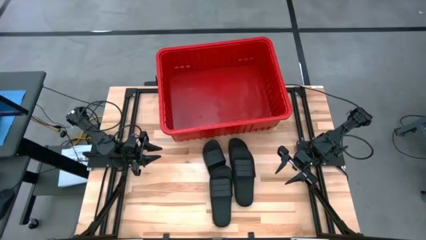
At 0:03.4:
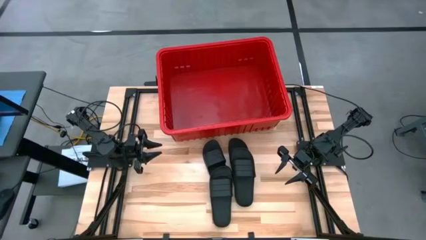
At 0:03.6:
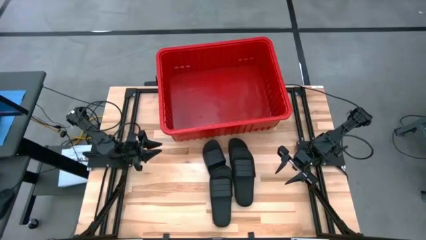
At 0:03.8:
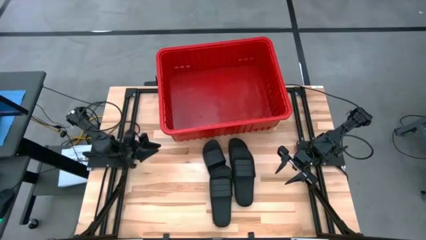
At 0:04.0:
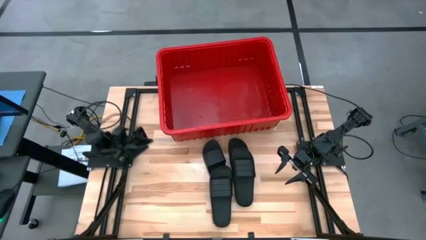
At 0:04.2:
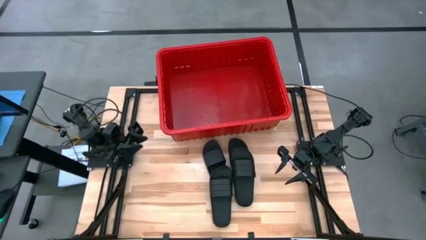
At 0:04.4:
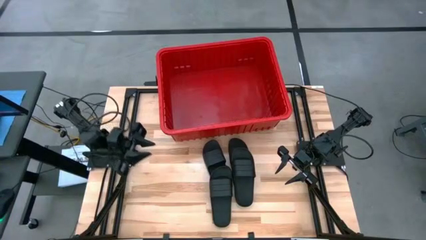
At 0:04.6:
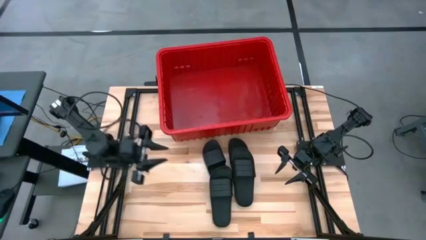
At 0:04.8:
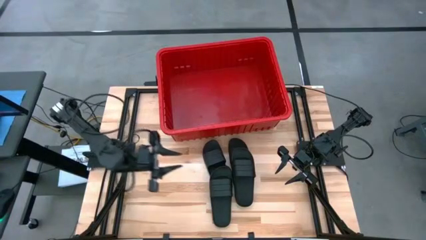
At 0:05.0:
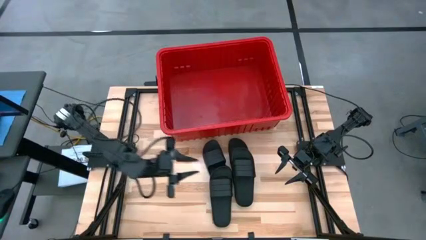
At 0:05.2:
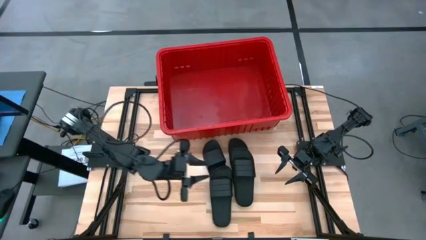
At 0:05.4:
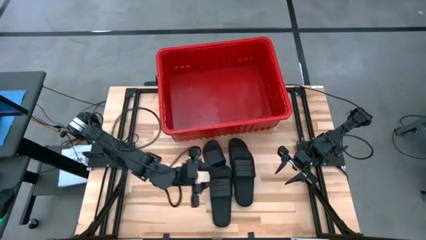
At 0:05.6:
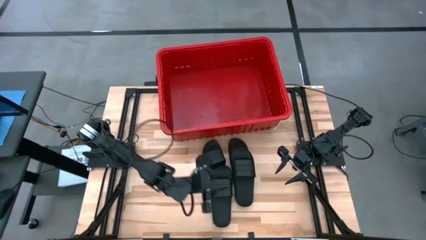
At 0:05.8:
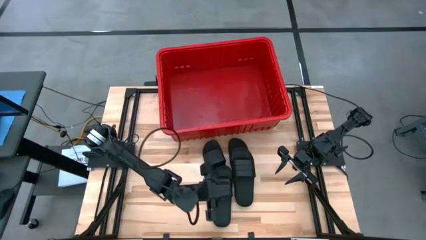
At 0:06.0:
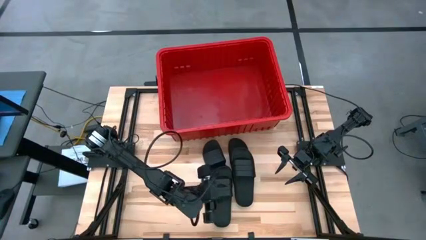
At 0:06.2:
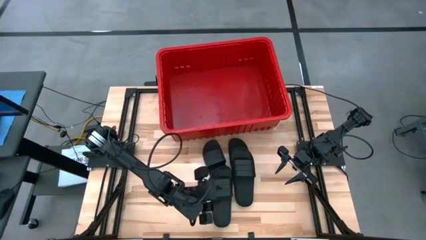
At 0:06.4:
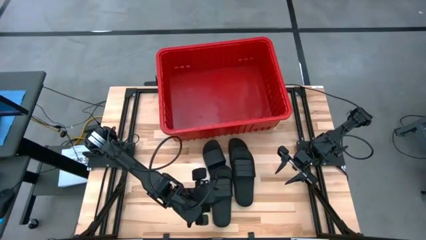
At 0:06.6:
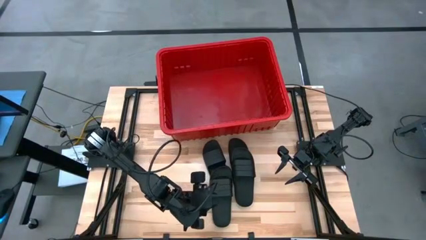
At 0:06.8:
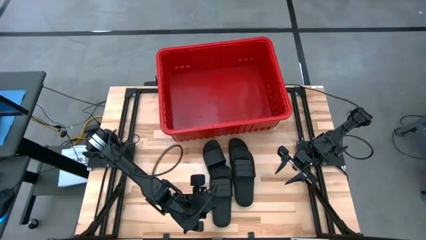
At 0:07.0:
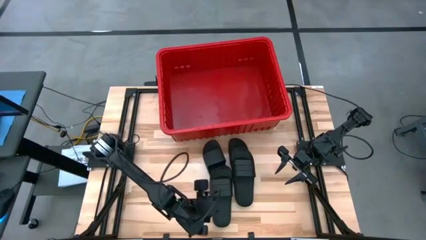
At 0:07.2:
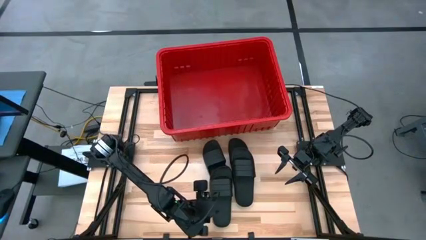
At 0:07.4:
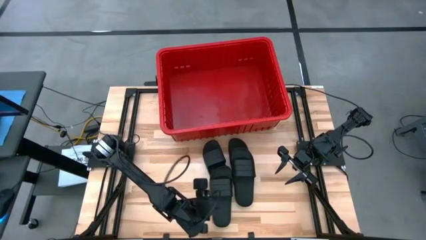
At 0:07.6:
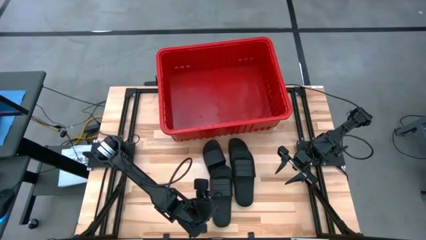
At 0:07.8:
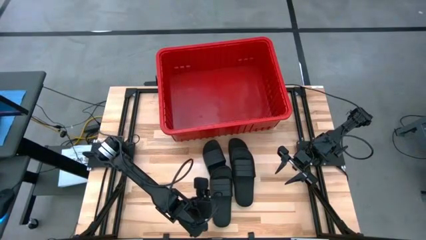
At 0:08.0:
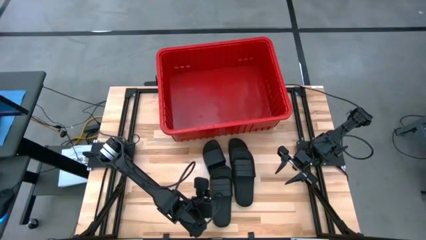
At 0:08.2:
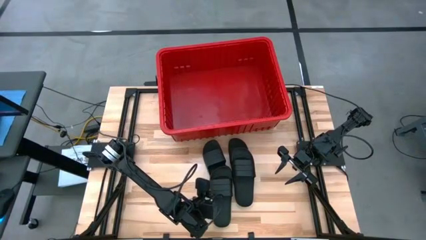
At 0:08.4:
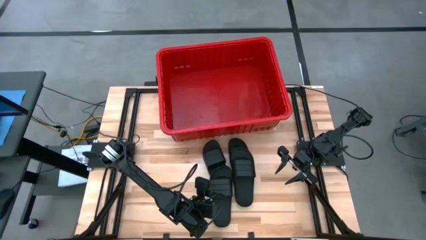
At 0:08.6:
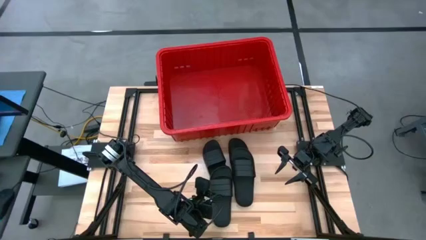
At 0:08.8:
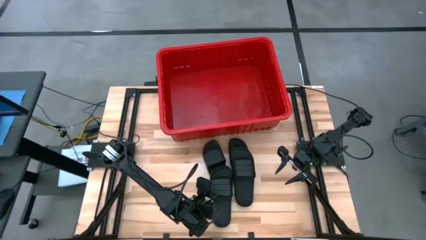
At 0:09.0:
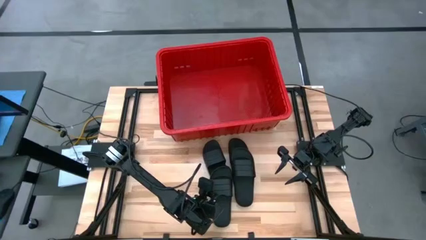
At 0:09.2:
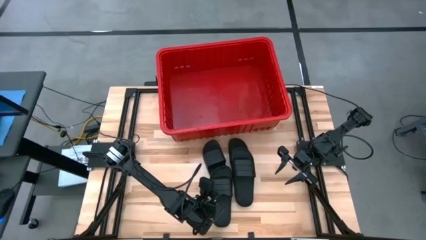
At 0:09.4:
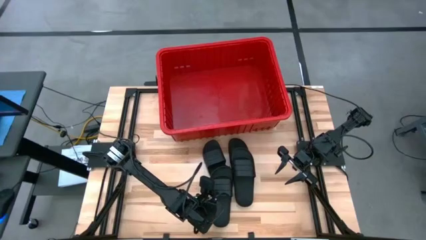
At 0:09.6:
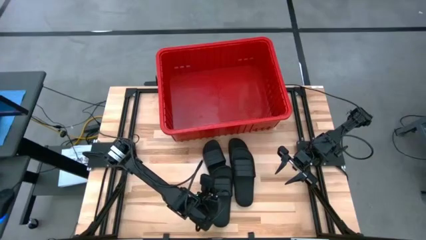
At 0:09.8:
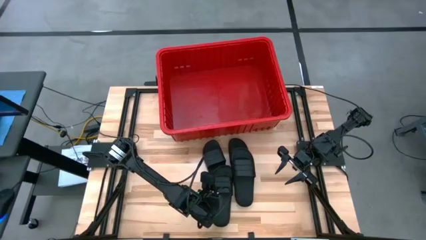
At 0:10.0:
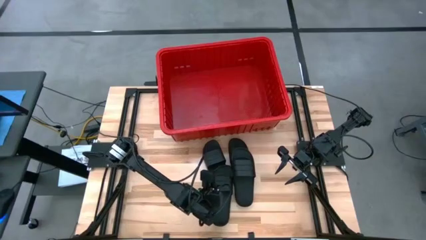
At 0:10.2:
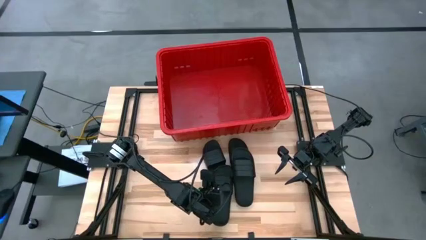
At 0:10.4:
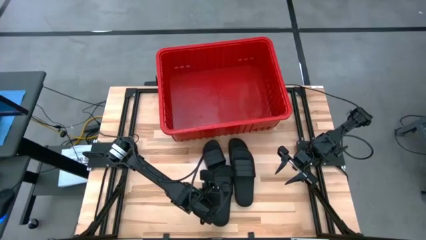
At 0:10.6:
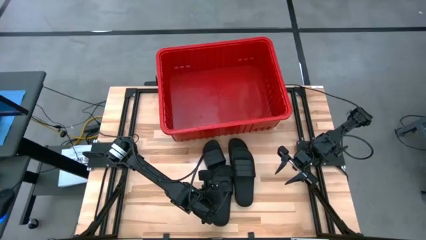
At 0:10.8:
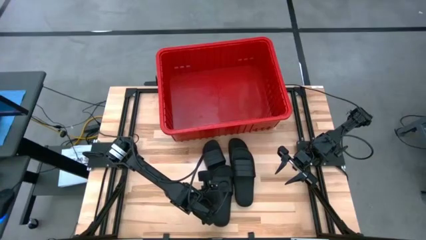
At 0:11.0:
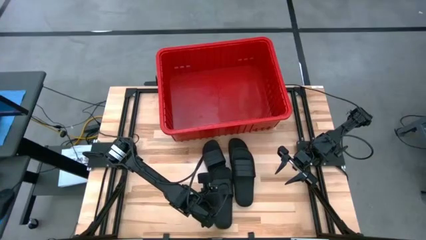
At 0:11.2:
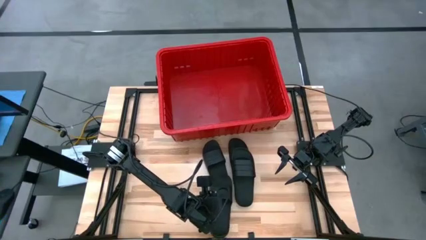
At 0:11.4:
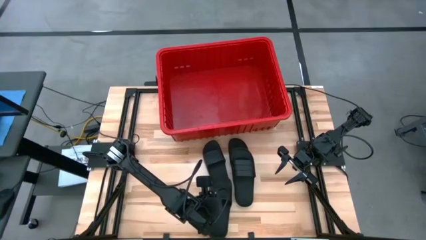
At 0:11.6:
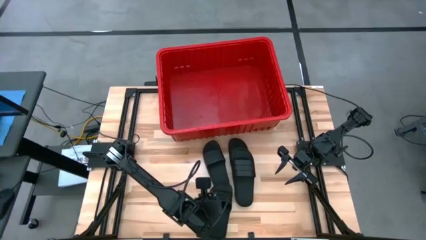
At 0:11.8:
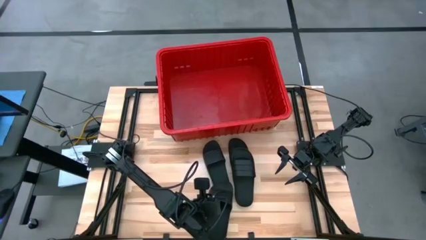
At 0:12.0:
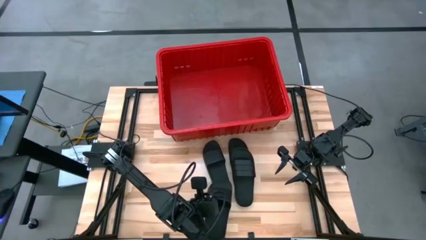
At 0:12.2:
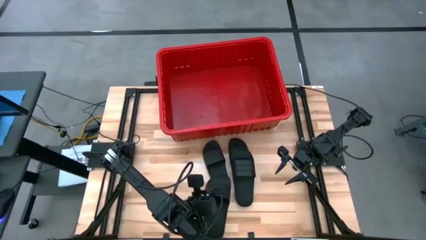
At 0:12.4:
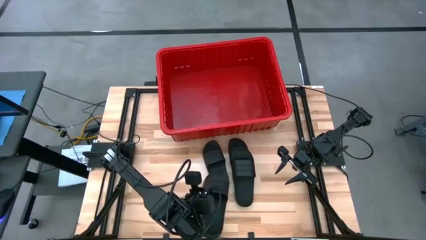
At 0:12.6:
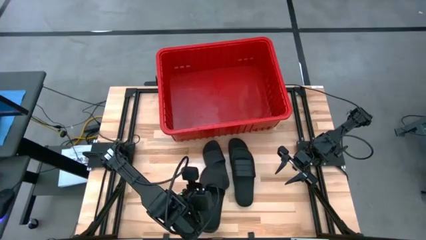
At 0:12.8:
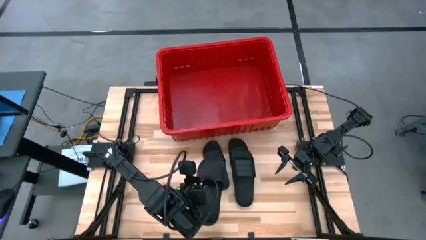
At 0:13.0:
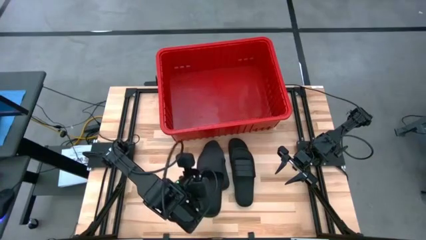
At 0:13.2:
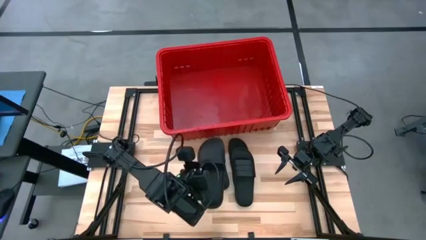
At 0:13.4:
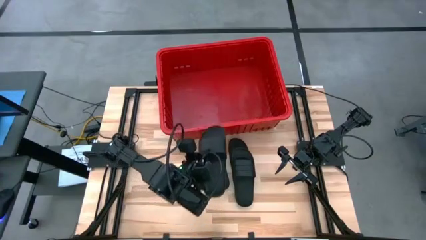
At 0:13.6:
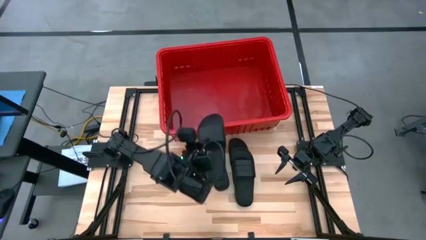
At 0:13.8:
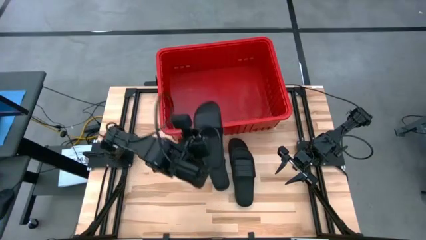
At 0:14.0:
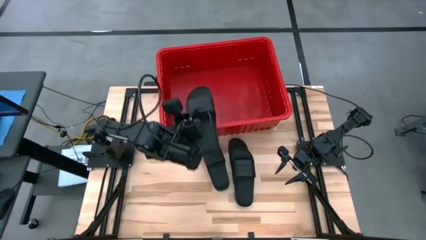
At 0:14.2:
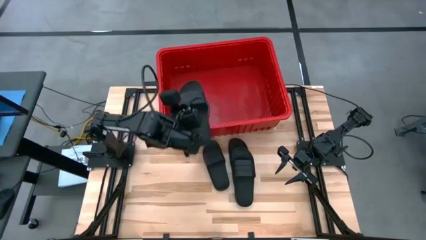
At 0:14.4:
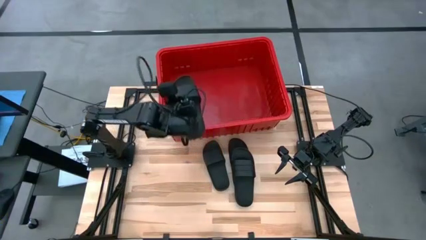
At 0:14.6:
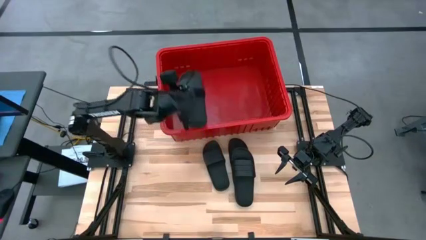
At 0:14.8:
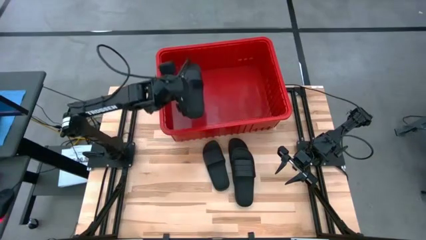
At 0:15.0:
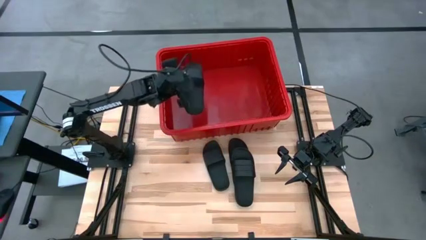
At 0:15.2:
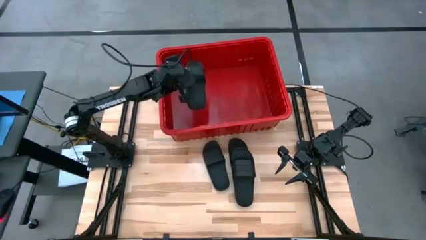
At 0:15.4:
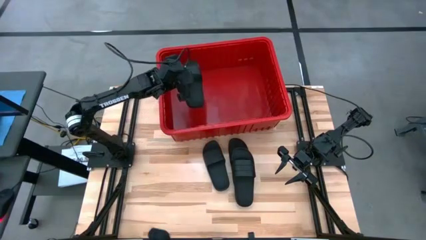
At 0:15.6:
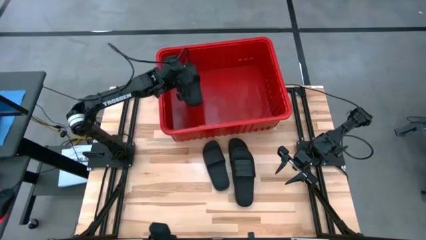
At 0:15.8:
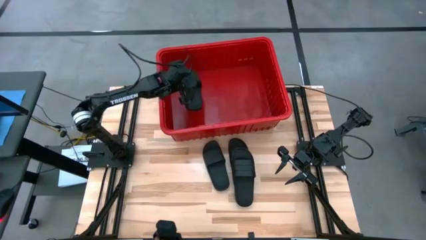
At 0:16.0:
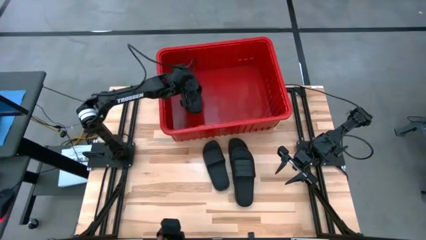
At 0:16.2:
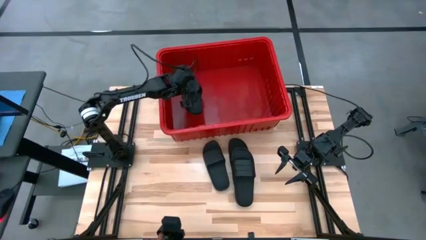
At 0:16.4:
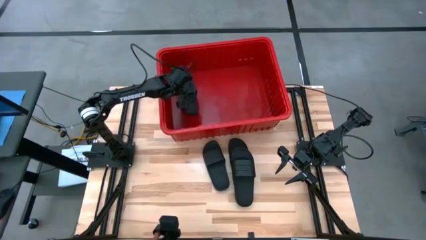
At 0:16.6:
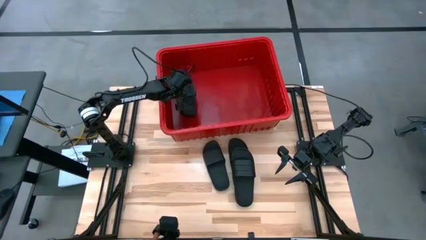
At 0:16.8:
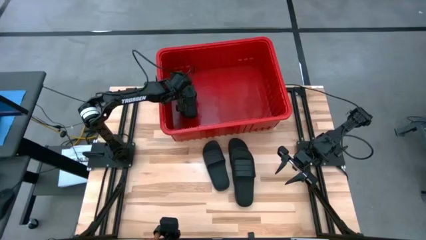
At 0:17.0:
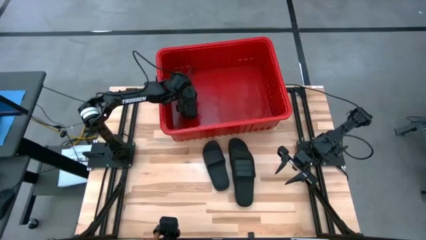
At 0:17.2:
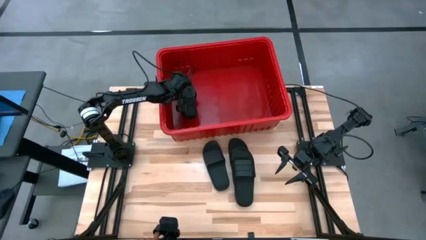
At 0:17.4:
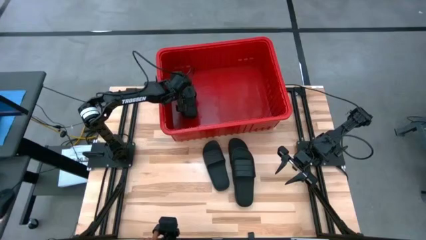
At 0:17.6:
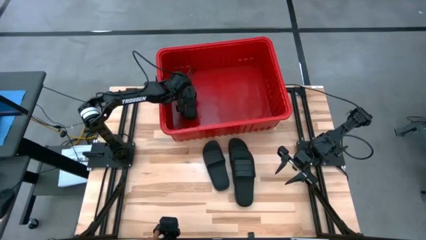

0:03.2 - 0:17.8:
Task: Pick and place slides into bin
Put the black slides into the red bin
